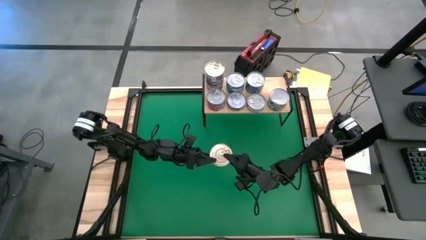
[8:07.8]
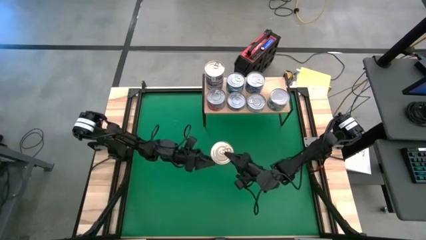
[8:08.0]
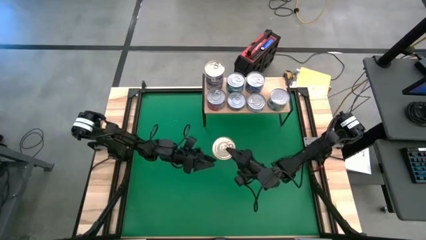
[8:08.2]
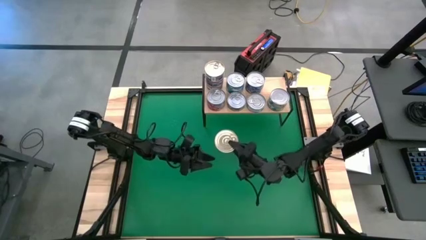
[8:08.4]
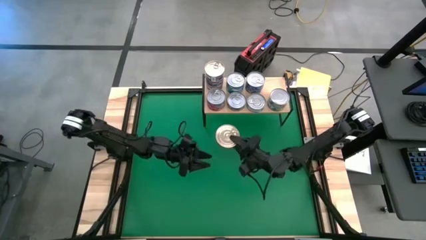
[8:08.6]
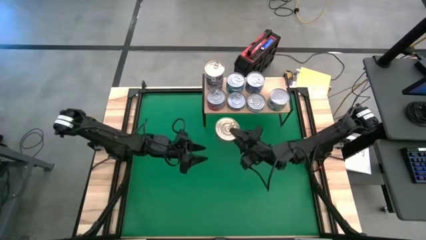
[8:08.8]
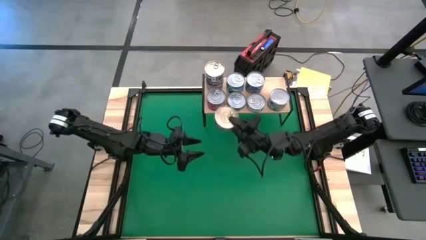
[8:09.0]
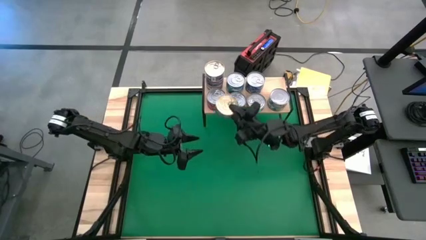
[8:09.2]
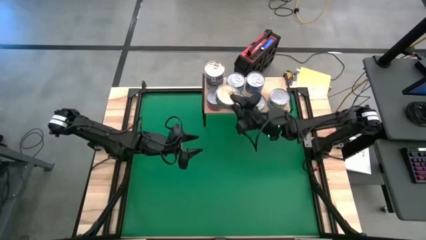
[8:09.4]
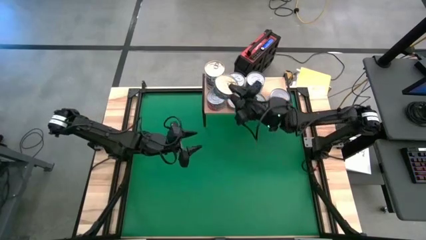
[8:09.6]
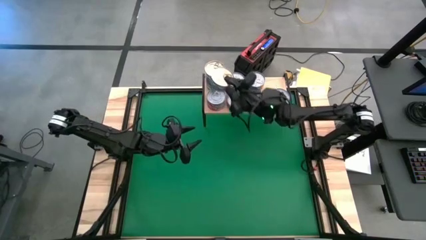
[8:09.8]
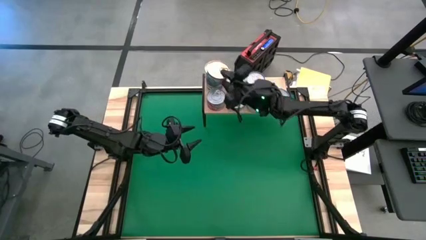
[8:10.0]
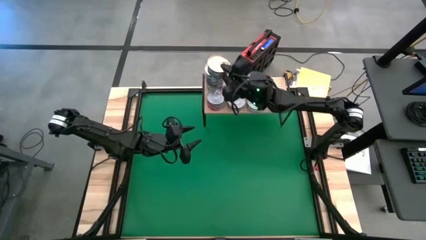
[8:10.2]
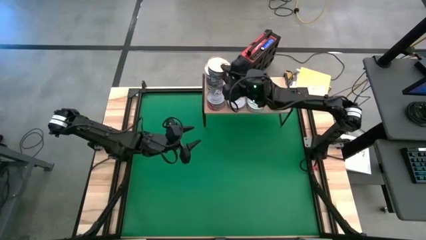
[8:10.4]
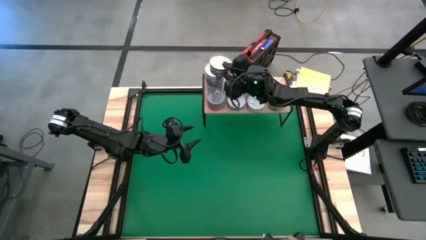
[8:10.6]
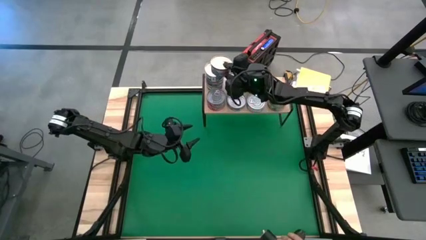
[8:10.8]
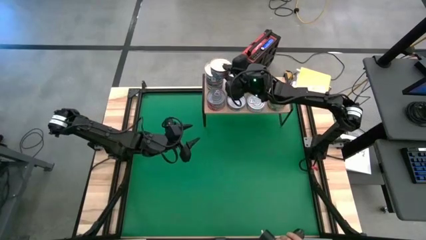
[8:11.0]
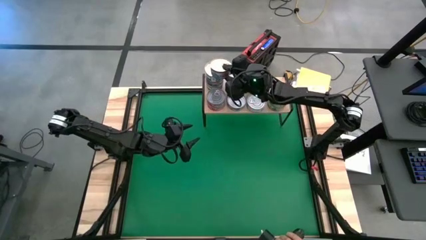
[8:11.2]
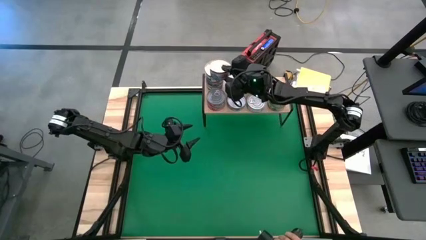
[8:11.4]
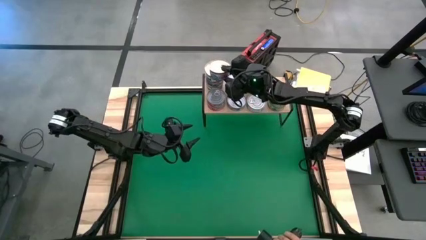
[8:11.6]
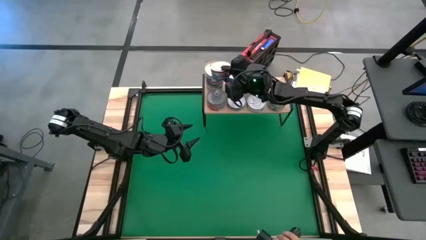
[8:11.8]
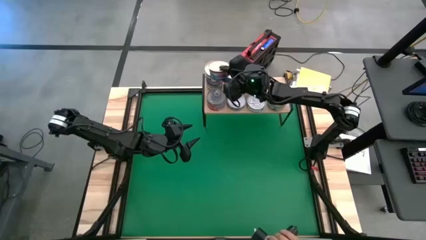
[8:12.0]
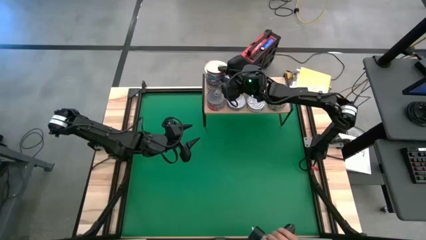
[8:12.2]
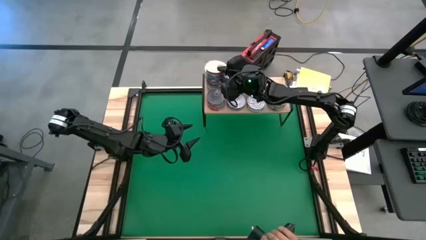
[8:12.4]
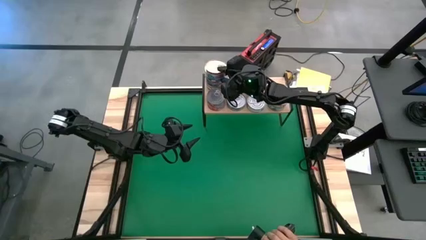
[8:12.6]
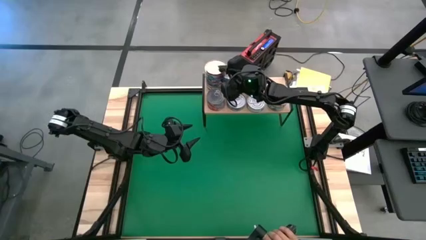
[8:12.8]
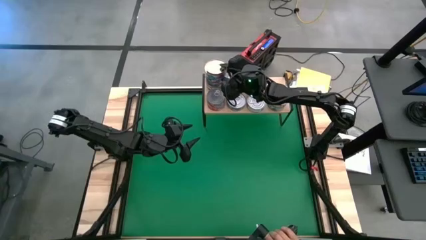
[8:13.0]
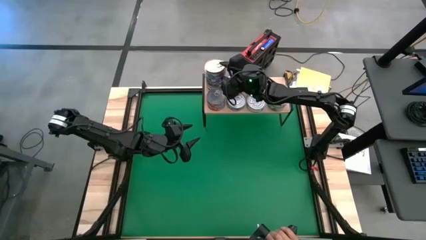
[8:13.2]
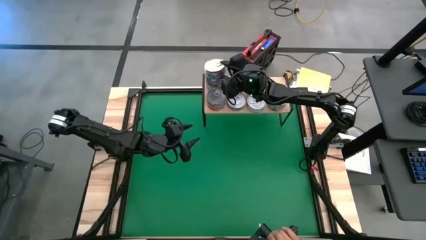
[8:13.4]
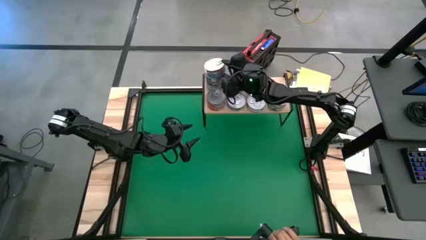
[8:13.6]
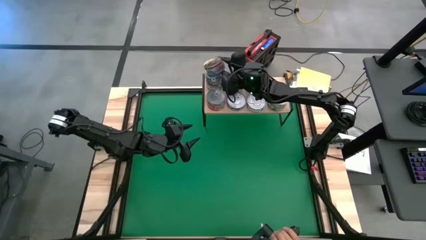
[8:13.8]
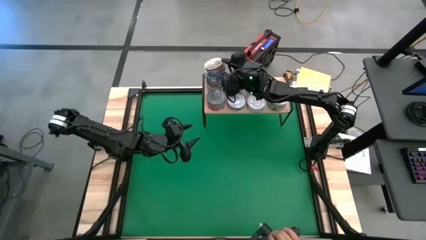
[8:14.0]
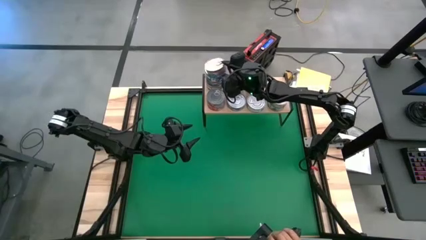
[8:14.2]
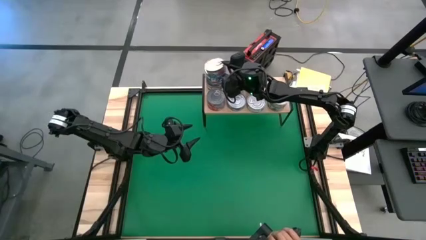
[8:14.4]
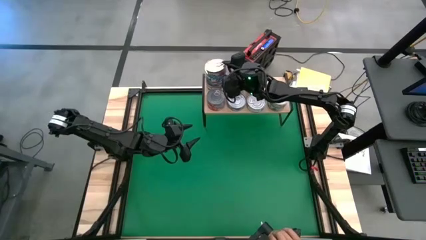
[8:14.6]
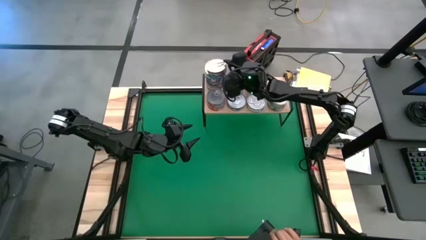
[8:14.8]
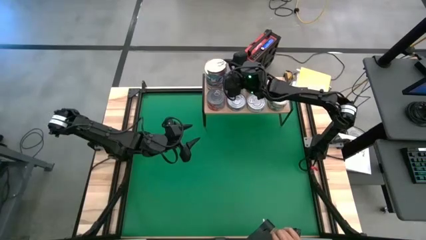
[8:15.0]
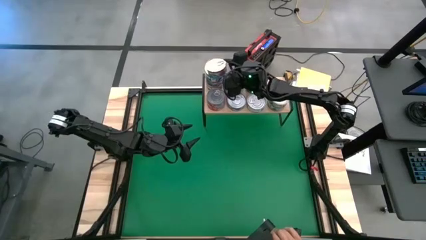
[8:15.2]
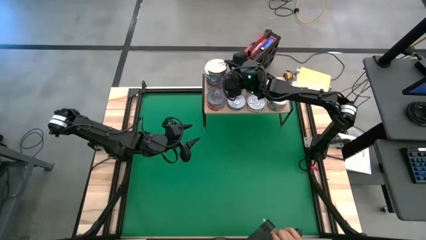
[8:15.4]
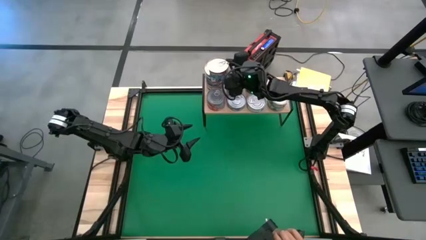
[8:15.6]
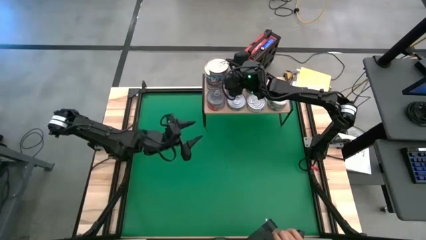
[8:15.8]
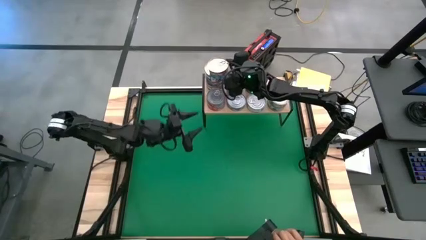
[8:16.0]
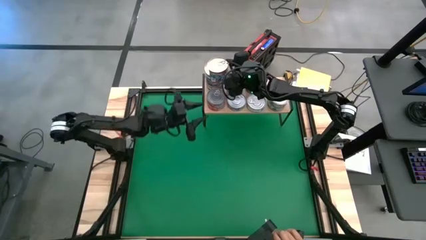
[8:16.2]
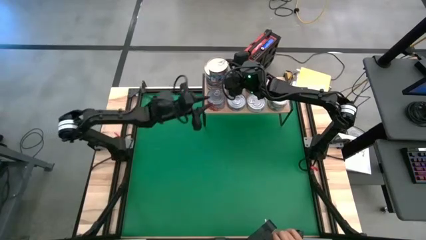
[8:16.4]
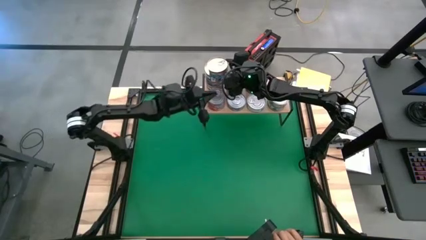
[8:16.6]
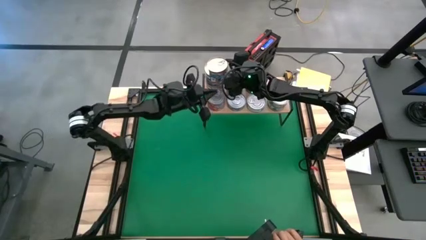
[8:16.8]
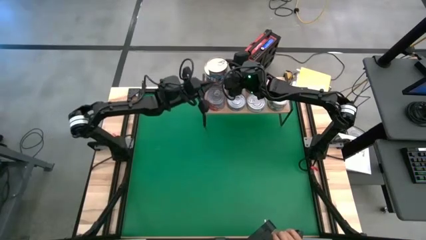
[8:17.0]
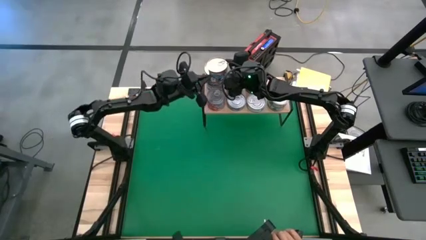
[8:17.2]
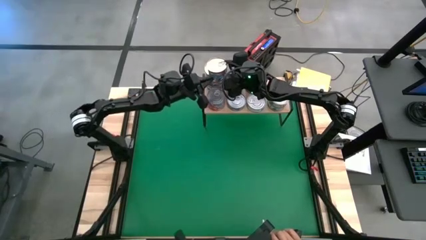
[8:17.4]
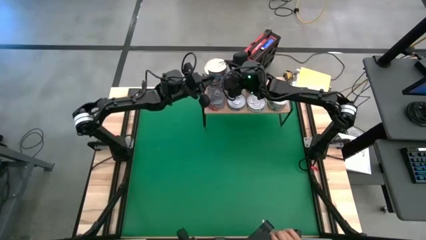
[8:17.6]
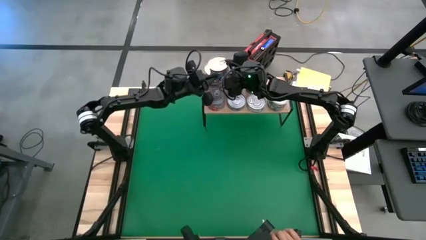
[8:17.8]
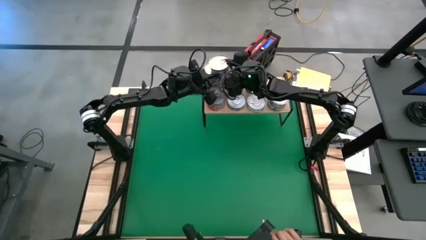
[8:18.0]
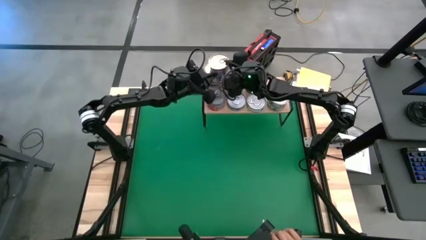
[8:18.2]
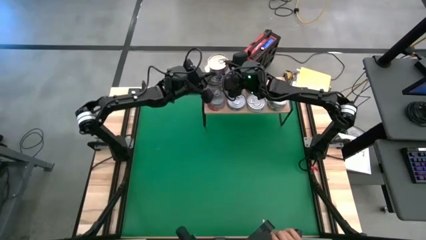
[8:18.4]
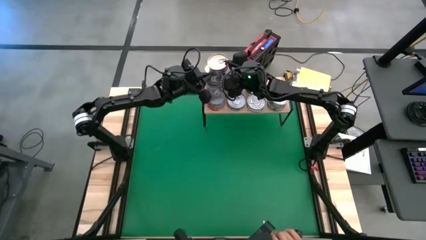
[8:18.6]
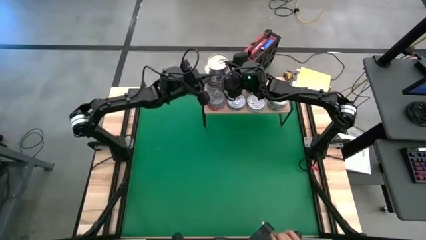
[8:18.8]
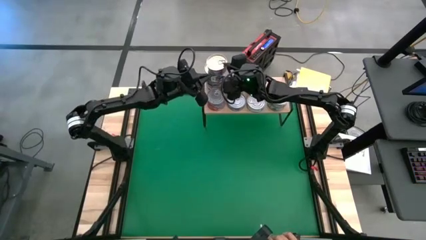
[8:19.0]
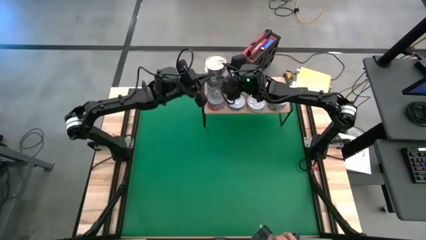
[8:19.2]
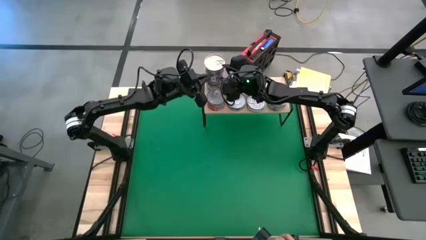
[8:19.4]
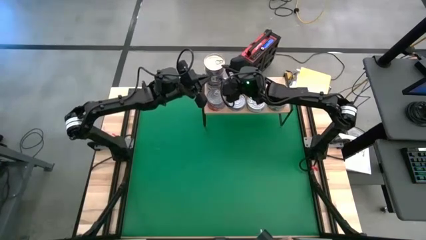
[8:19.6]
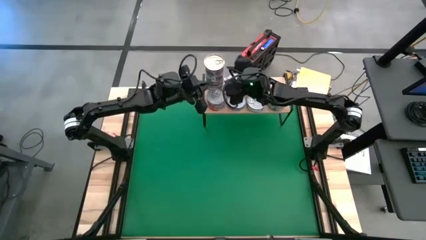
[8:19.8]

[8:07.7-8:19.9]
Task: Stack canned seafood by type on shelf
Stack the blue/pink tuna can on top of the other blue/pink tuna can on the shelf
